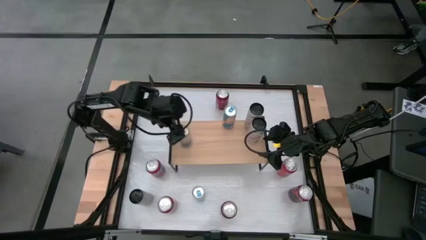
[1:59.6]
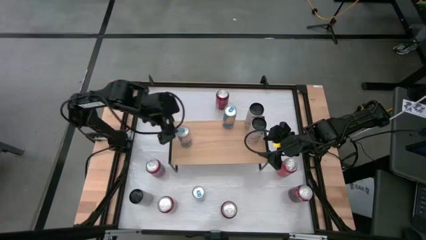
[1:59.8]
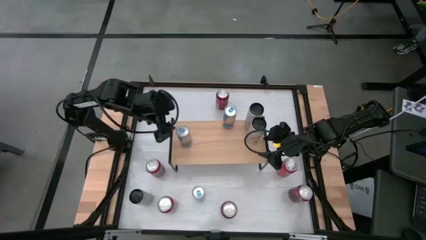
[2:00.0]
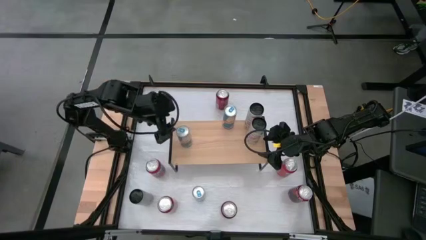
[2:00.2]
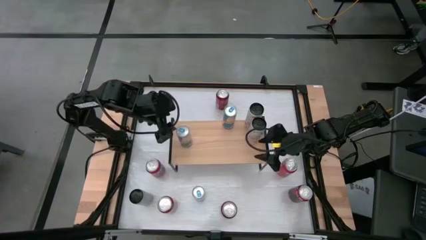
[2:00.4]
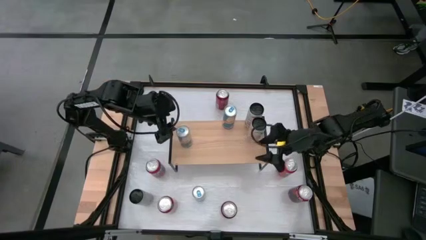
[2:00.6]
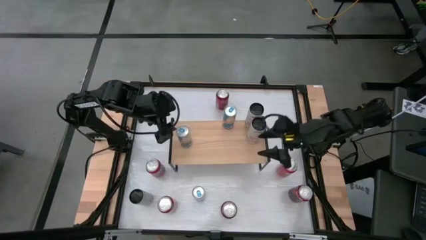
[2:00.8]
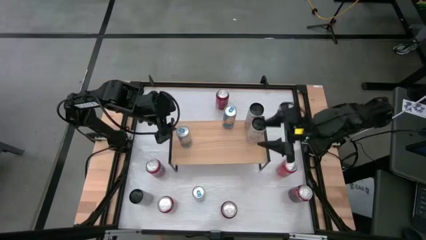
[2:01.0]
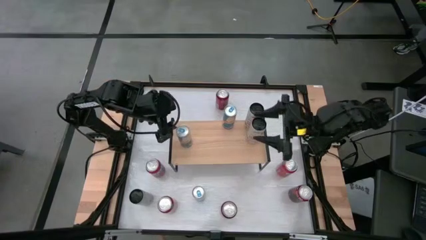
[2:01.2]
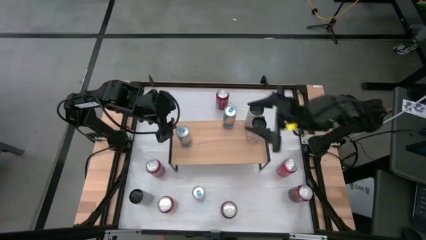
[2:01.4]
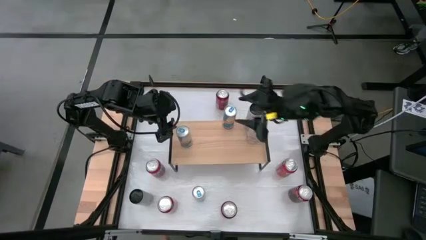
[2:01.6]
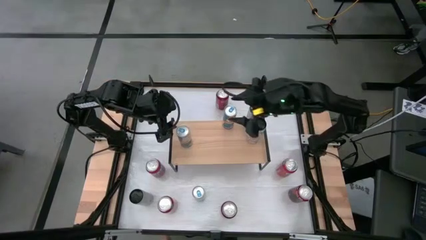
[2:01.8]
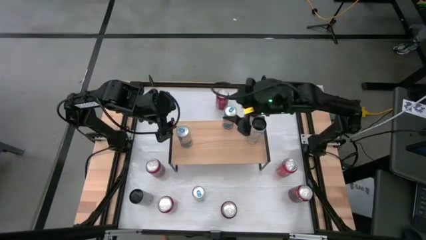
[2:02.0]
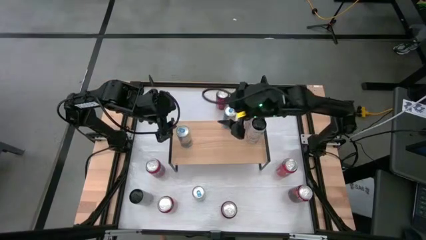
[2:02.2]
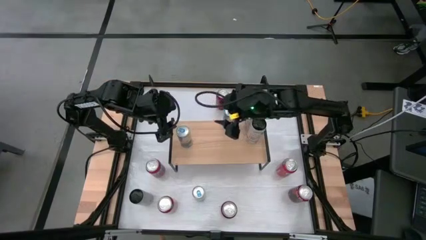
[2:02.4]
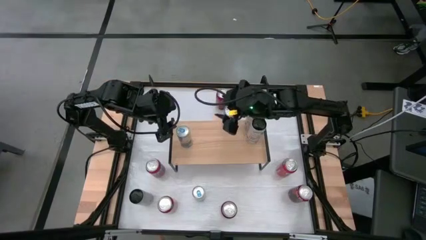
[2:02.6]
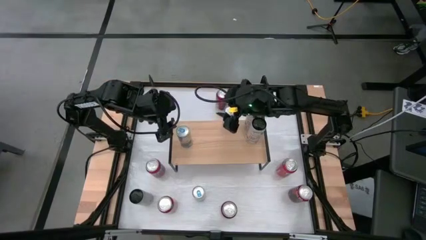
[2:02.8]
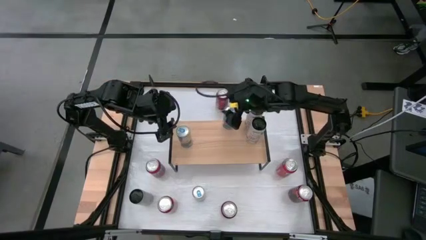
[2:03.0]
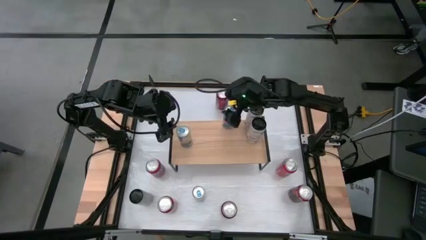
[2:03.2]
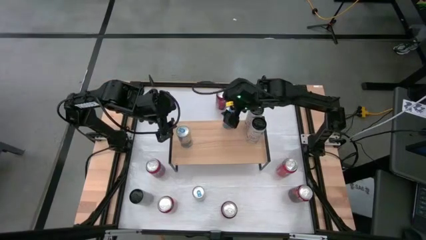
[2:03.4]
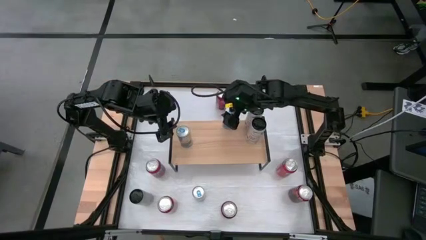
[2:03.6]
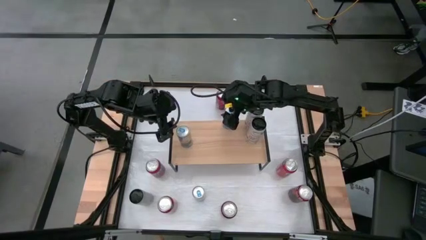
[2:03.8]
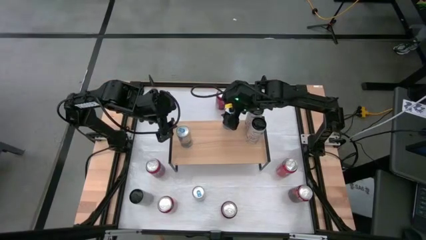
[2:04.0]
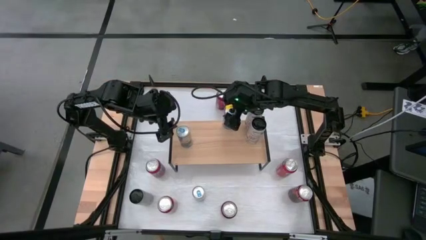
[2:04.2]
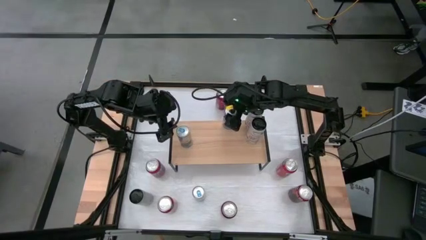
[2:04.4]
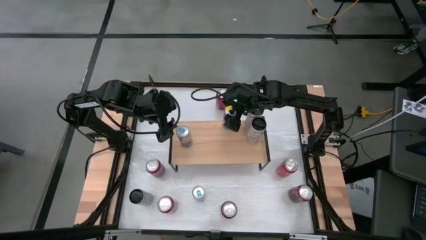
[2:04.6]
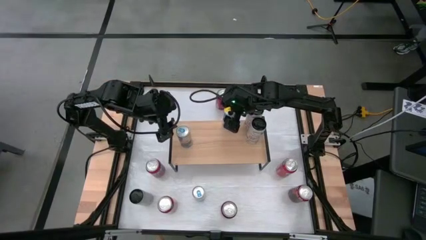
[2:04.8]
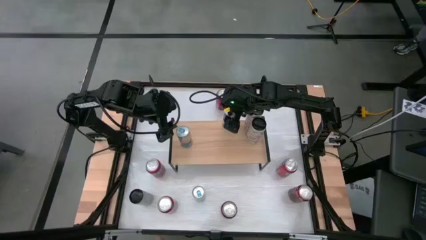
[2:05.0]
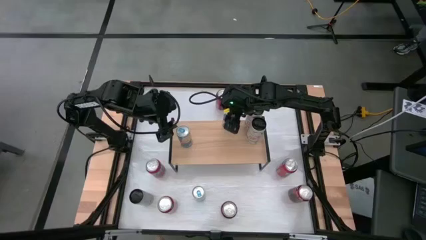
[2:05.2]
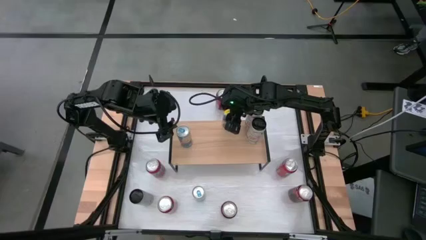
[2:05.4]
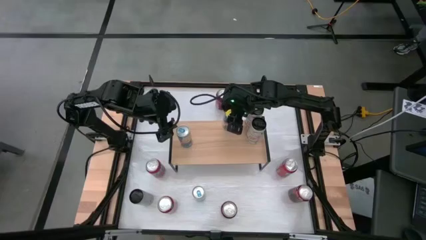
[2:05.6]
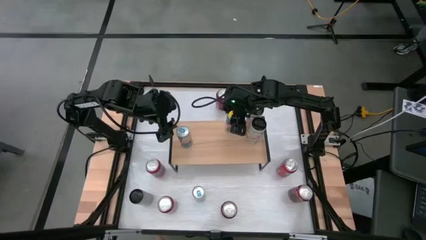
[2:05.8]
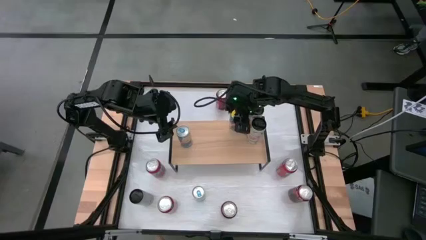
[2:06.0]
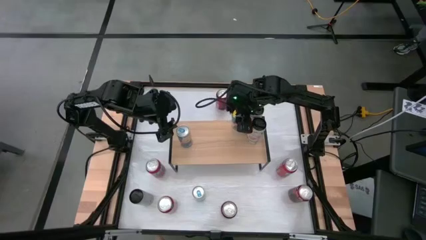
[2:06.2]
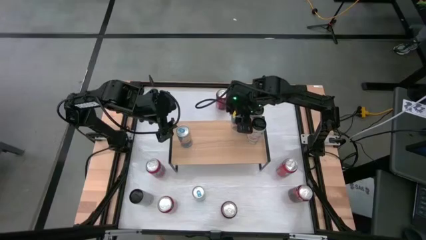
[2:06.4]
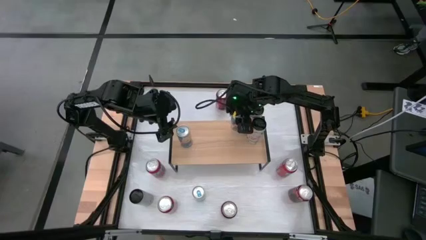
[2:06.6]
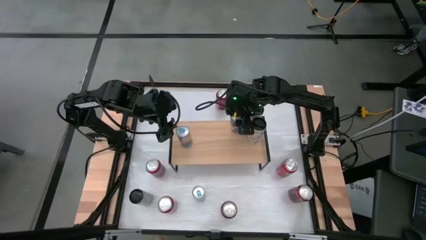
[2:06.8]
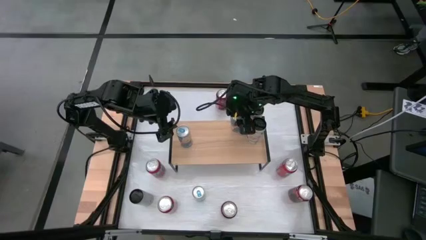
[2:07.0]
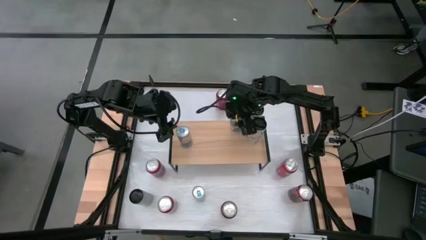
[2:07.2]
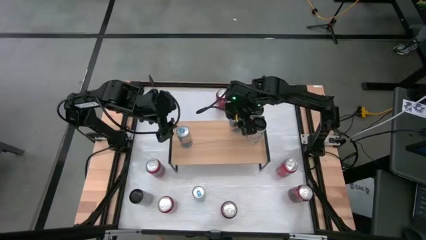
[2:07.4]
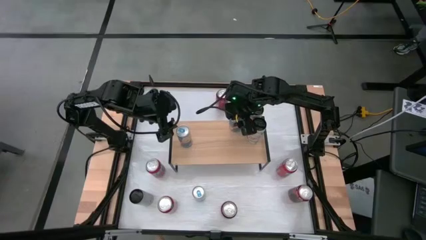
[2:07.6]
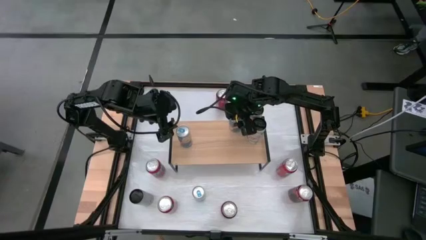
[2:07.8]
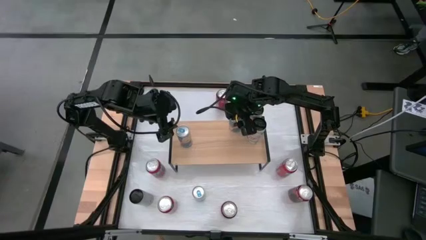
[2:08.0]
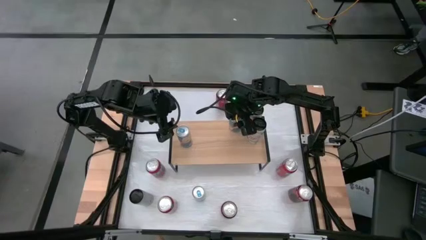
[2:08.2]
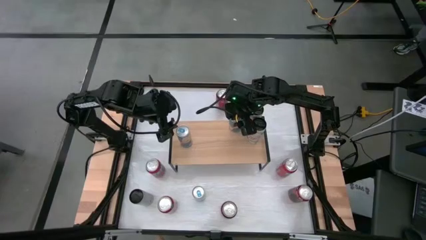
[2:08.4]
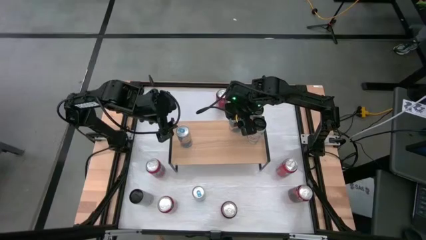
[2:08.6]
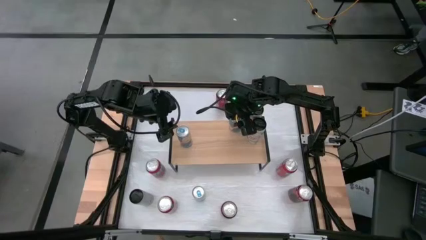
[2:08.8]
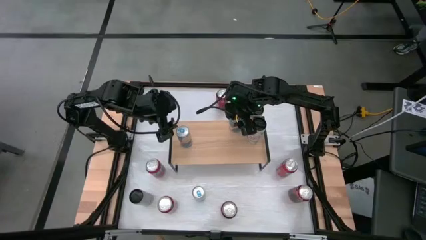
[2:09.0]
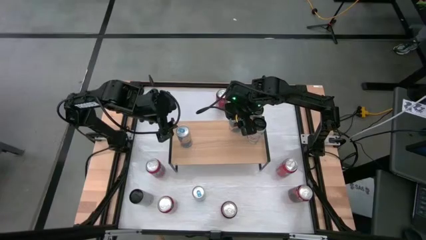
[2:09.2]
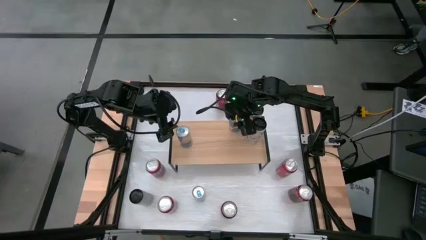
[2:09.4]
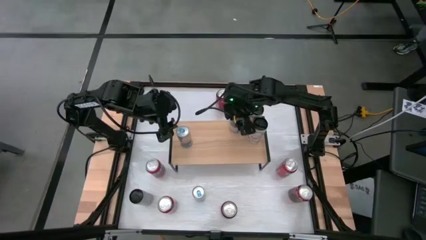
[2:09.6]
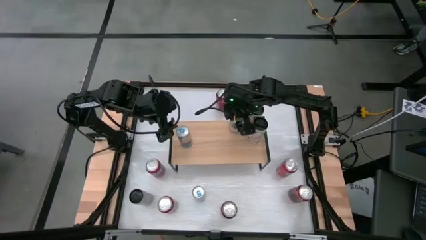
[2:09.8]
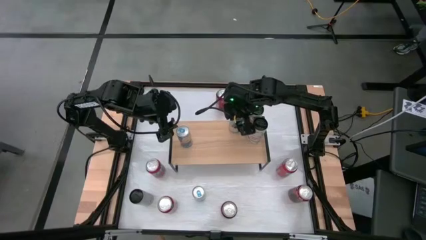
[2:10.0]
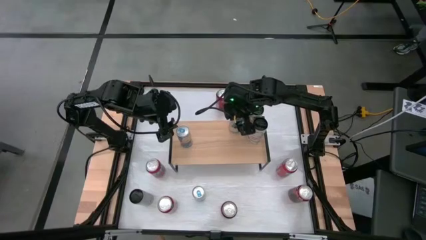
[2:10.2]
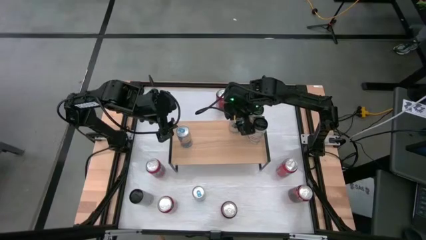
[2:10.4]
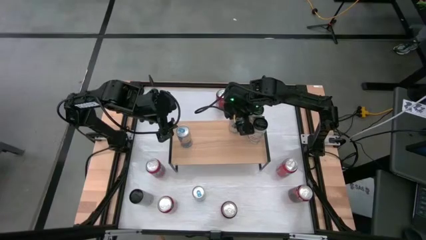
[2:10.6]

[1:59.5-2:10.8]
Task: Place canned beverage on shelf
Adjust the right blue soda can on the shelf

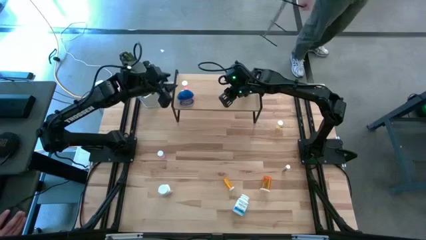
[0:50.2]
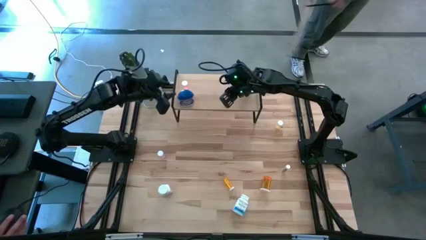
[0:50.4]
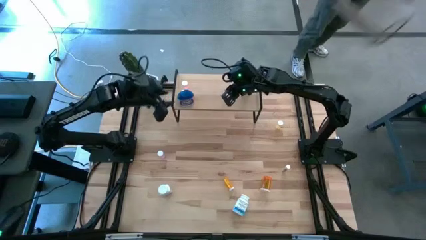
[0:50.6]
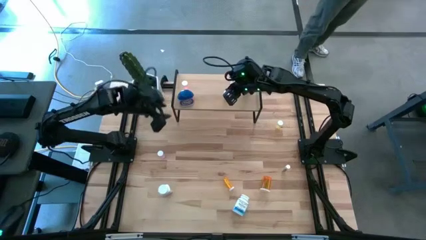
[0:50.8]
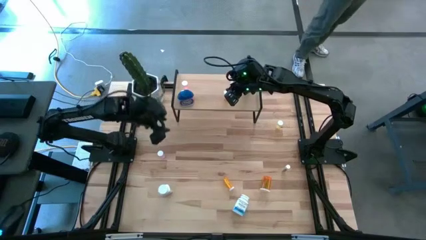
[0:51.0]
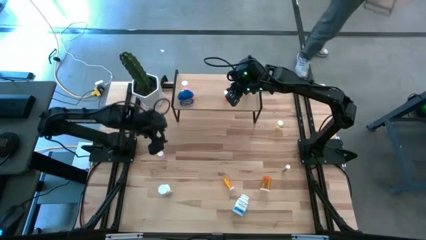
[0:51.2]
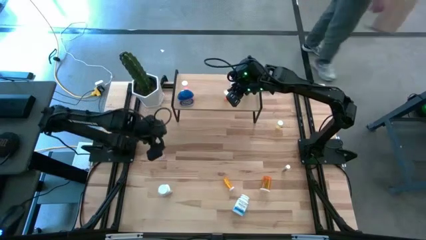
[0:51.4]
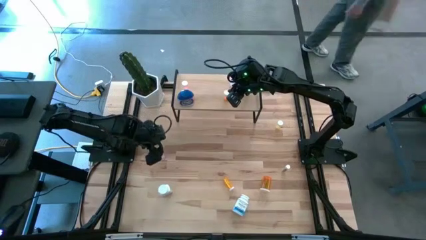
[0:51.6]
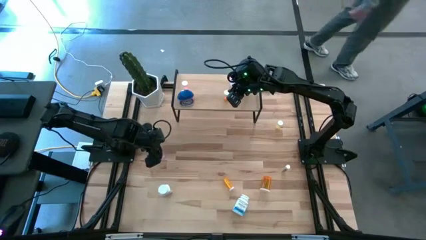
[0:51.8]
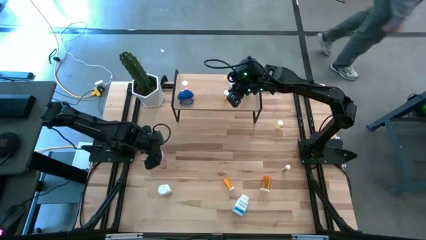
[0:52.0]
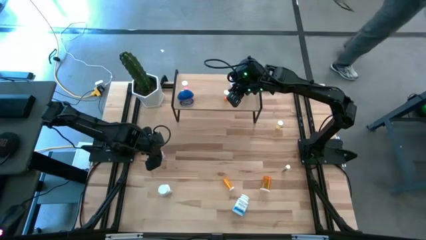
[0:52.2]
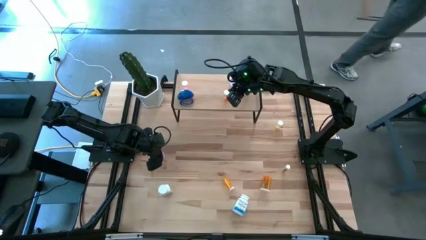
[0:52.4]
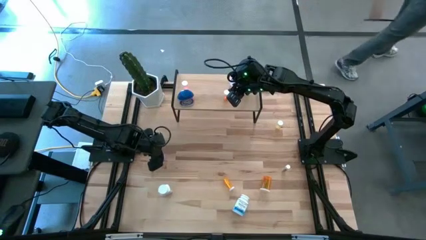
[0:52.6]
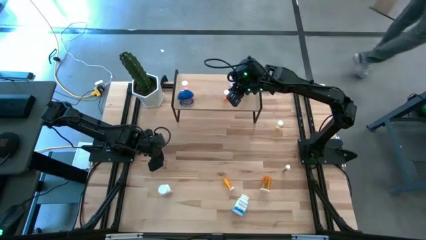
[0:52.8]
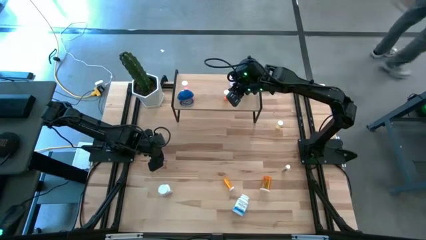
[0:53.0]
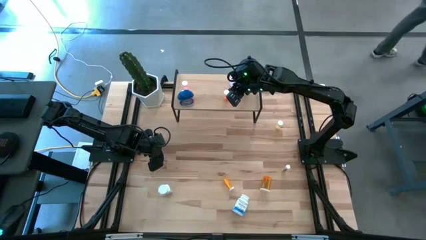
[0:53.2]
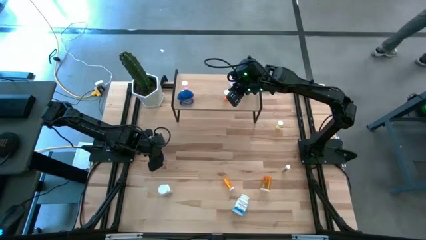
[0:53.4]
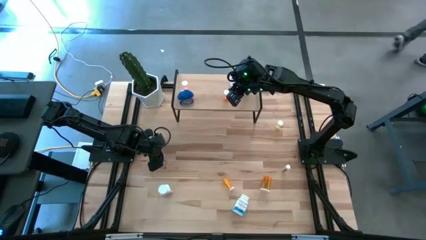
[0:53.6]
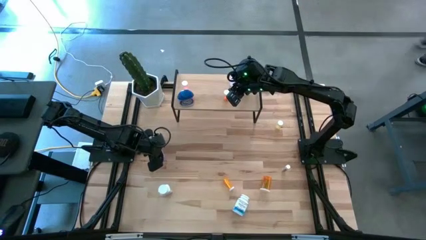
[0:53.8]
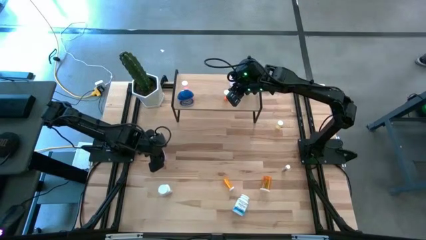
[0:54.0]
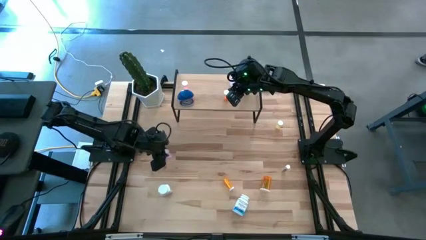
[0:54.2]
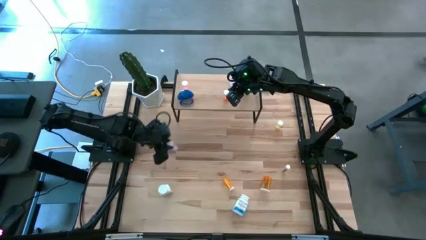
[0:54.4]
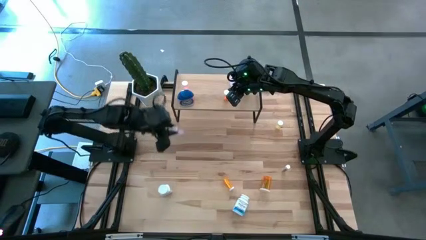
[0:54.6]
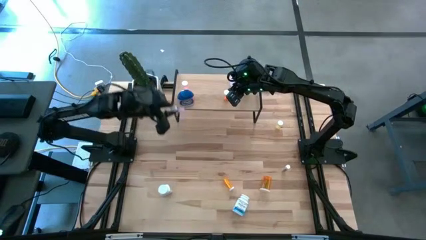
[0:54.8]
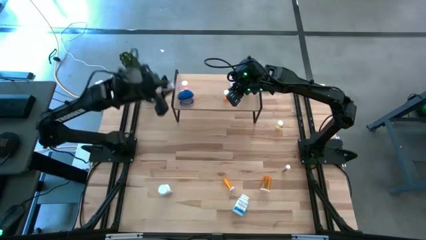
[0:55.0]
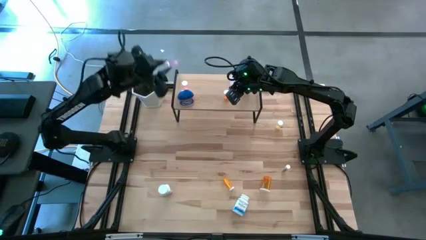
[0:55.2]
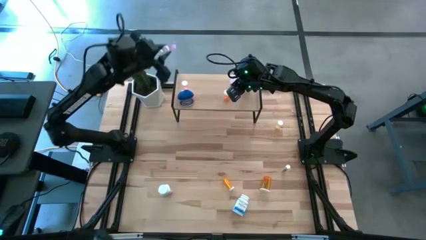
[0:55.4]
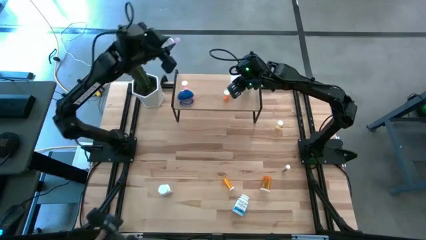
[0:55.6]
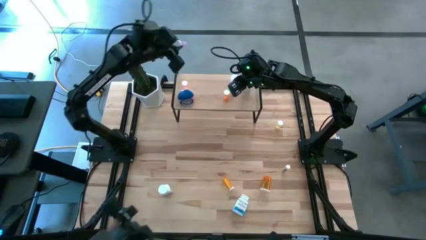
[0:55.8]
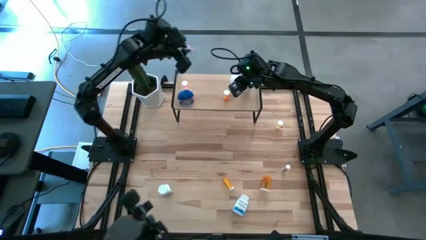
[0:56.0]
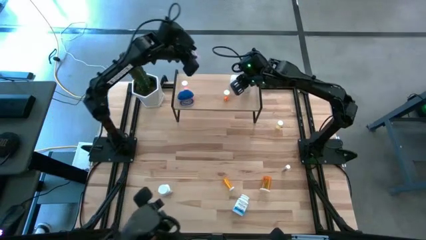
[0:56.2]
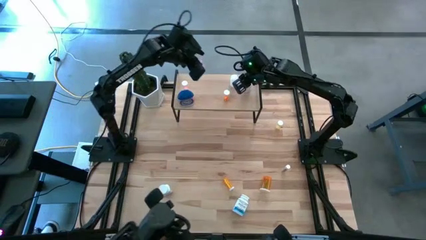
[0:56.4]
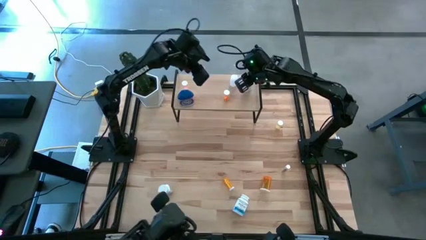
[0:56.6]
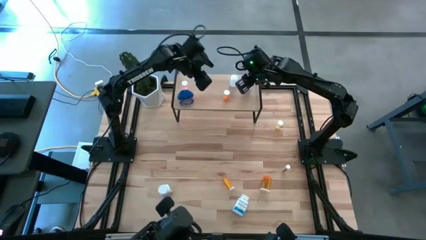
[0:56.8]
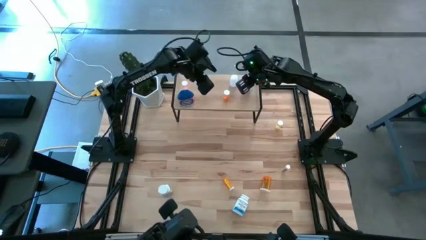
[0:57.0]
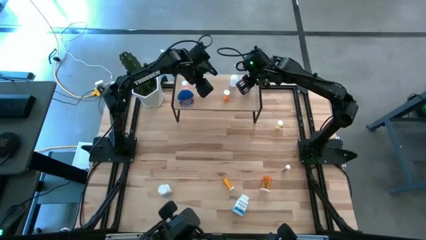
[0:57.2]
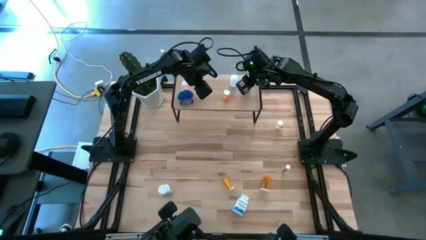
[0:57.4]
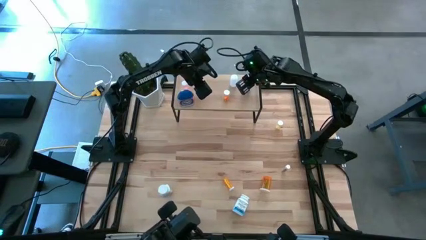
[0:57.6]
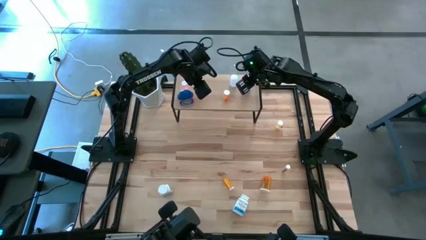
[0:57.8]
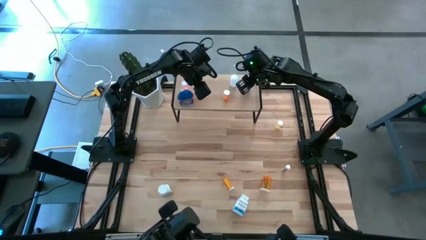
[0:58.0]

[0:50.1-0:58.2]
Task: Pick and place medicine bottles onto shelf by color
Put the pink small pill bottle on the shelf
